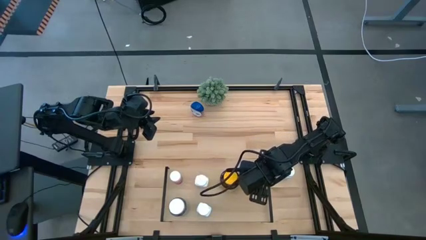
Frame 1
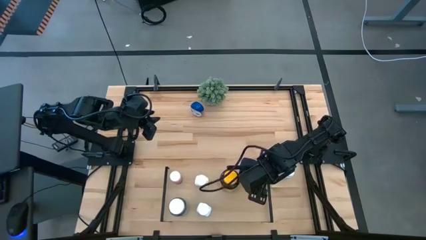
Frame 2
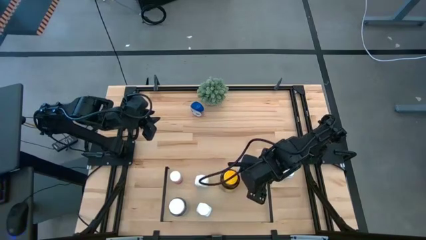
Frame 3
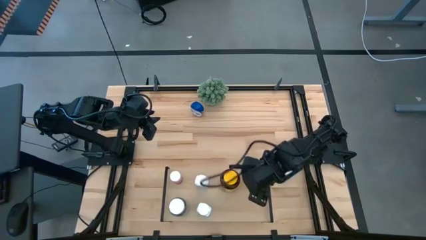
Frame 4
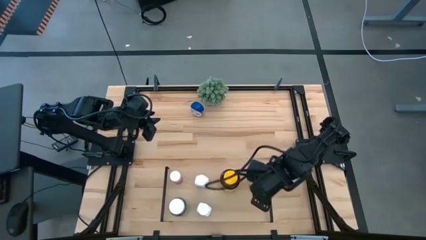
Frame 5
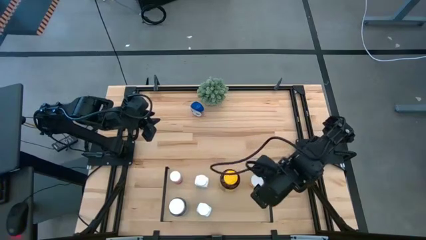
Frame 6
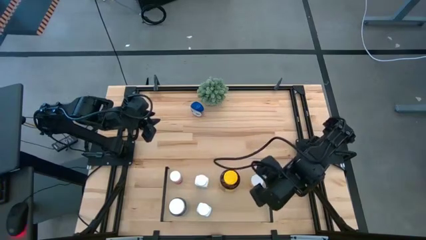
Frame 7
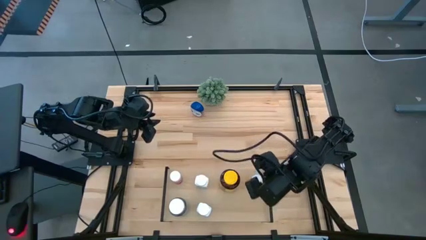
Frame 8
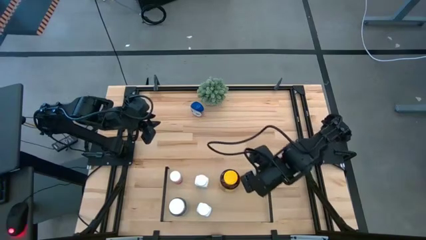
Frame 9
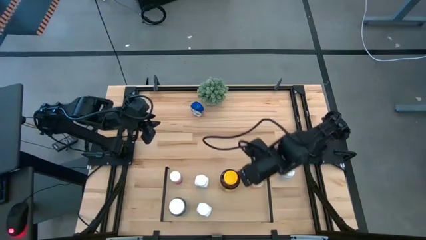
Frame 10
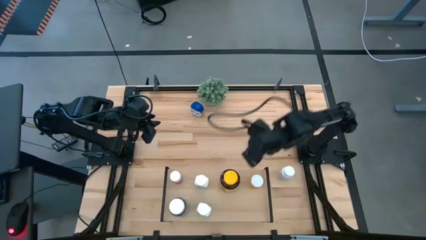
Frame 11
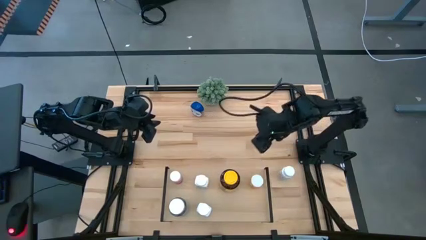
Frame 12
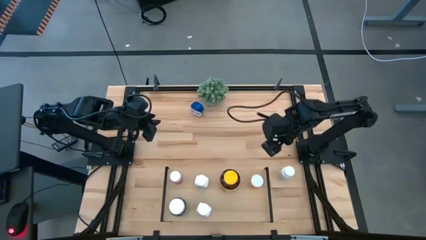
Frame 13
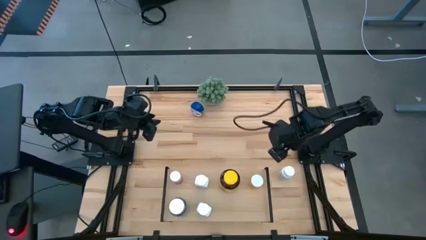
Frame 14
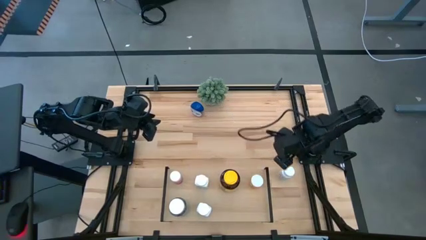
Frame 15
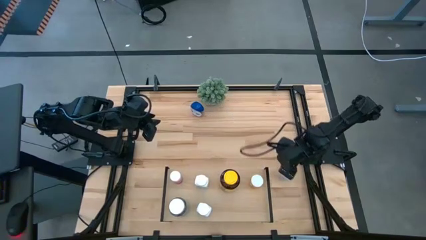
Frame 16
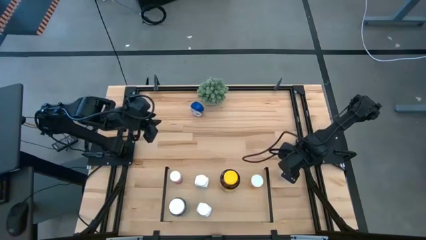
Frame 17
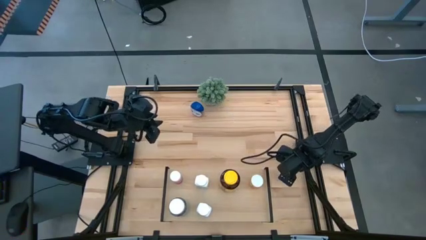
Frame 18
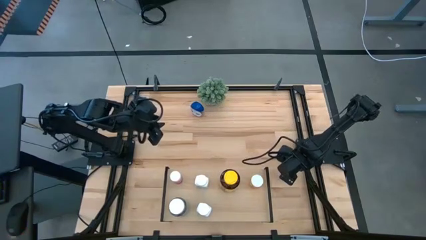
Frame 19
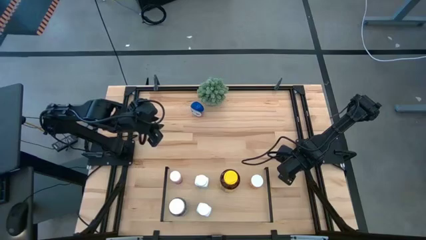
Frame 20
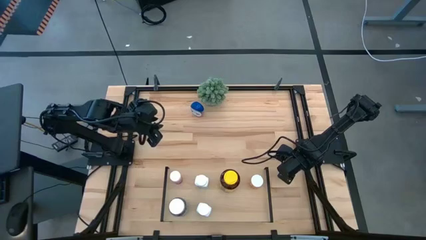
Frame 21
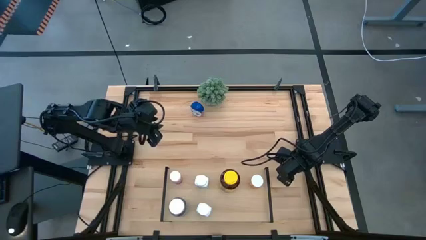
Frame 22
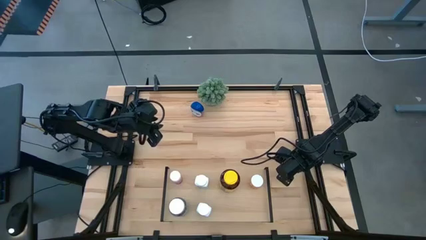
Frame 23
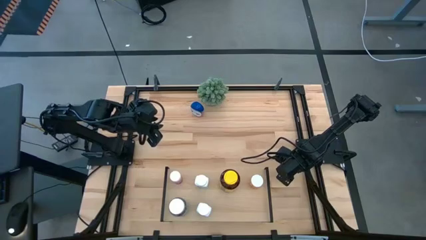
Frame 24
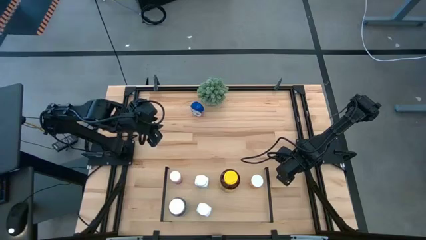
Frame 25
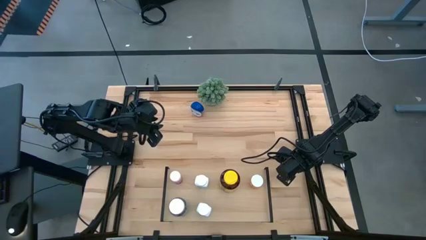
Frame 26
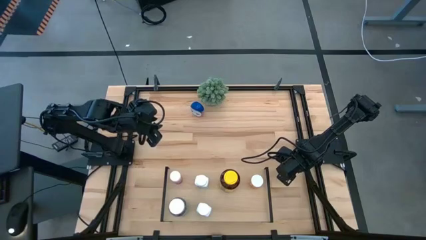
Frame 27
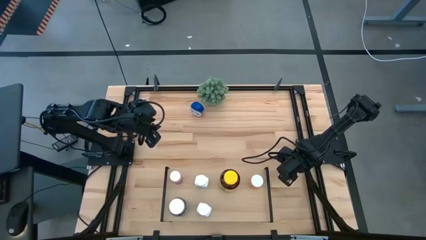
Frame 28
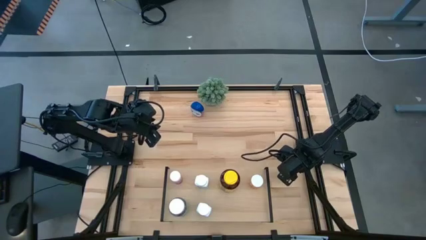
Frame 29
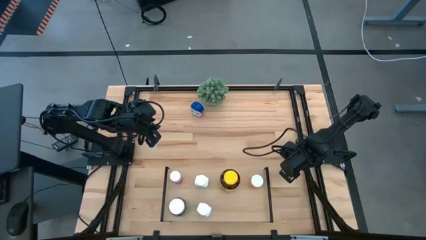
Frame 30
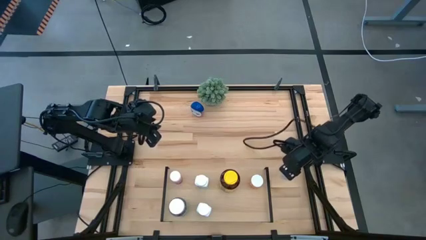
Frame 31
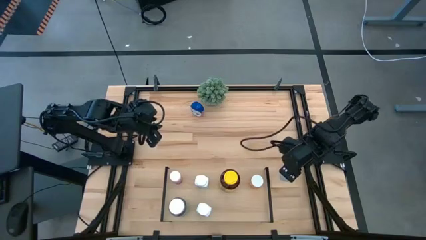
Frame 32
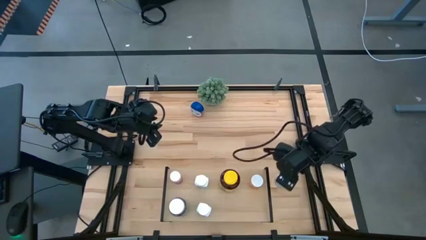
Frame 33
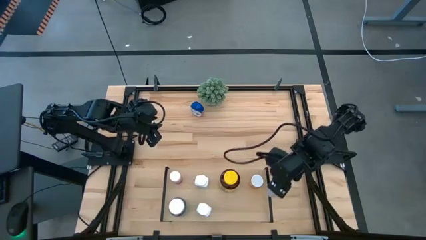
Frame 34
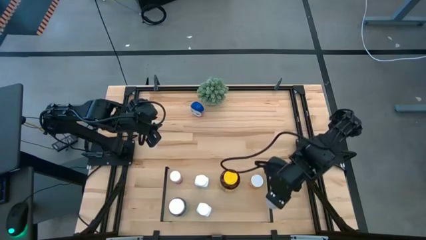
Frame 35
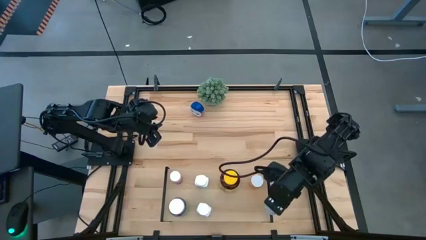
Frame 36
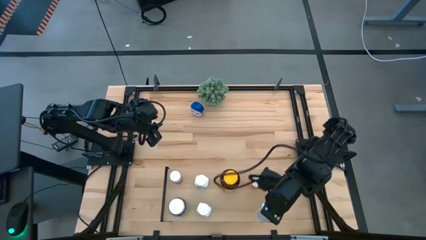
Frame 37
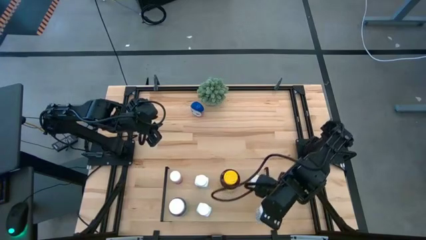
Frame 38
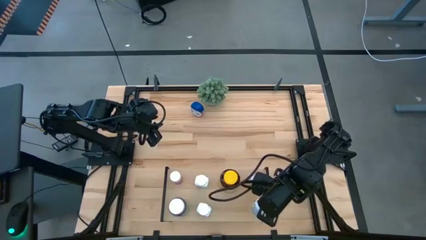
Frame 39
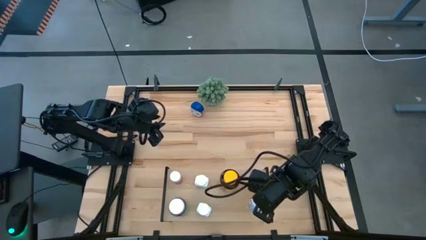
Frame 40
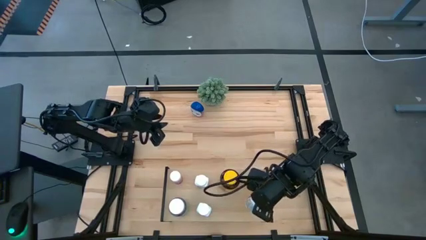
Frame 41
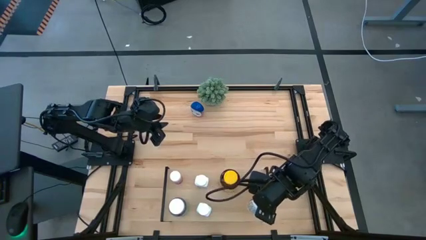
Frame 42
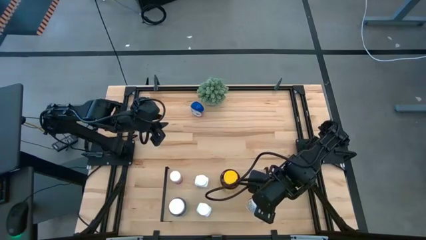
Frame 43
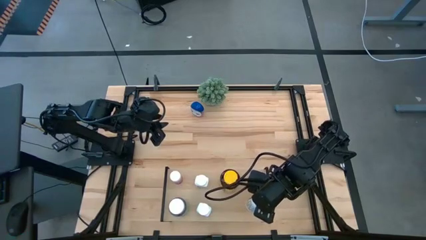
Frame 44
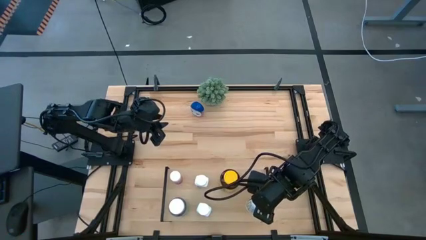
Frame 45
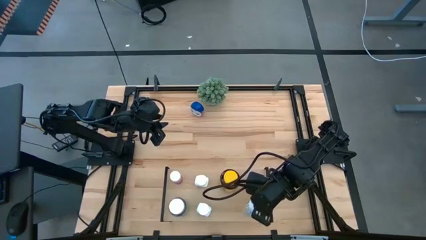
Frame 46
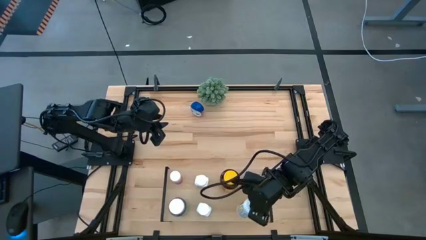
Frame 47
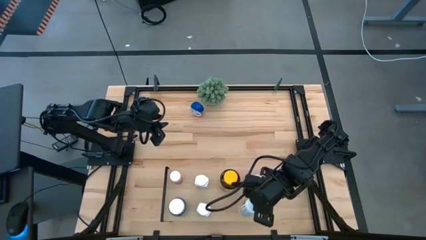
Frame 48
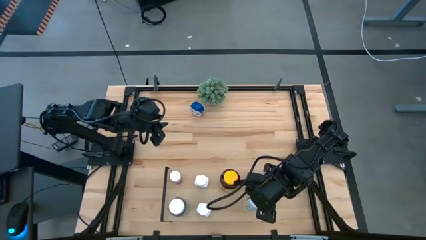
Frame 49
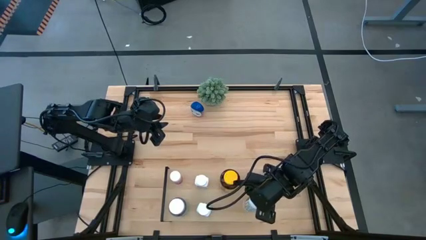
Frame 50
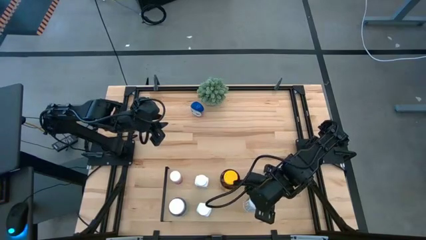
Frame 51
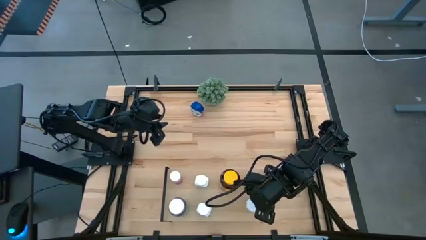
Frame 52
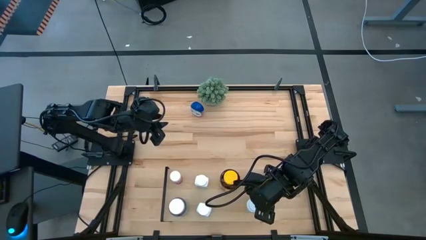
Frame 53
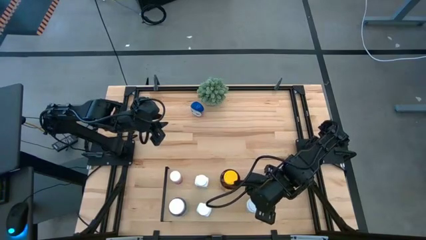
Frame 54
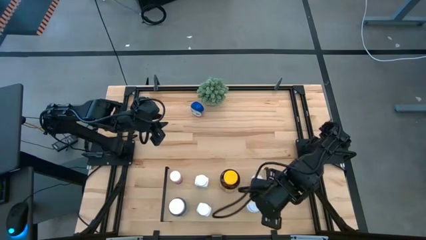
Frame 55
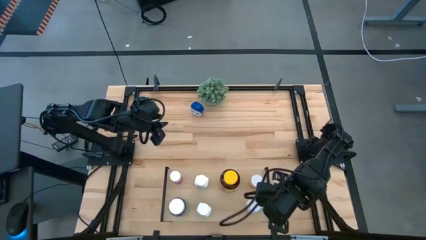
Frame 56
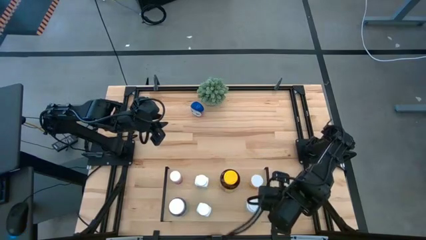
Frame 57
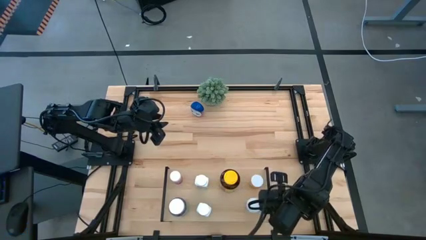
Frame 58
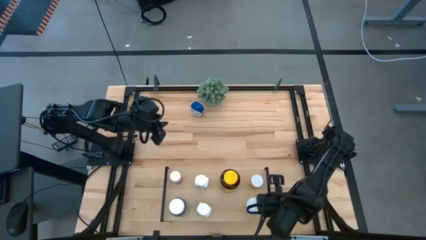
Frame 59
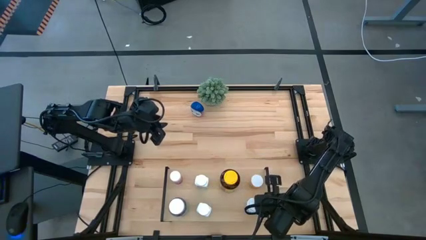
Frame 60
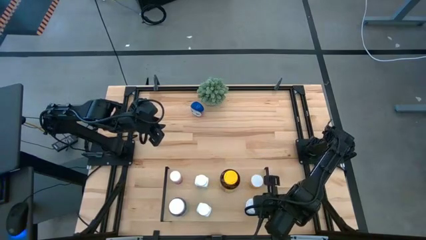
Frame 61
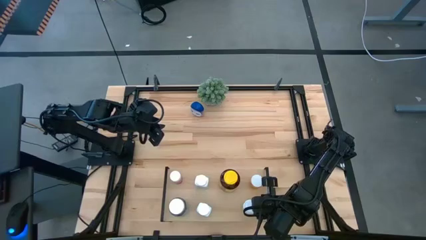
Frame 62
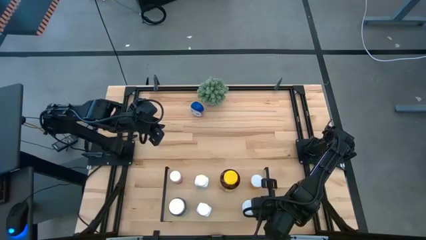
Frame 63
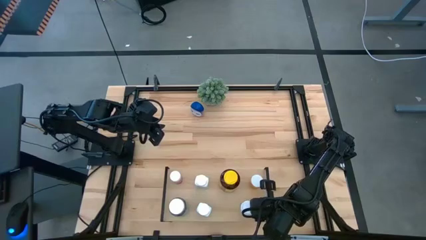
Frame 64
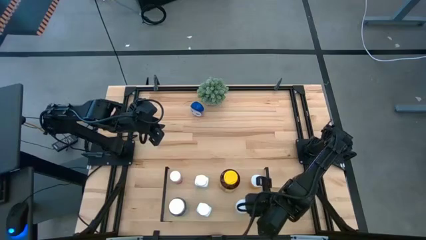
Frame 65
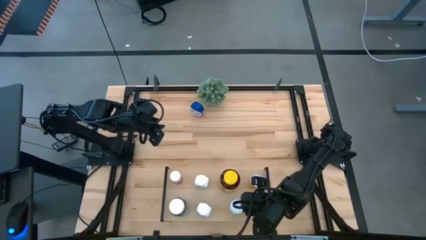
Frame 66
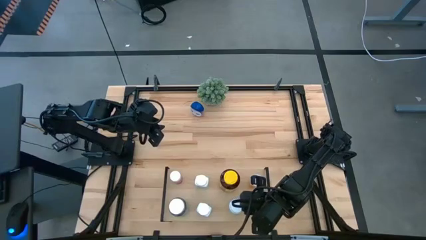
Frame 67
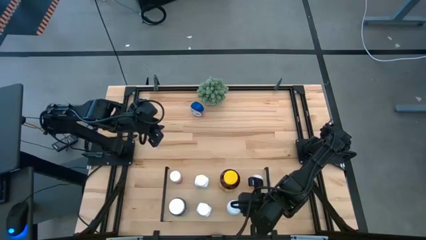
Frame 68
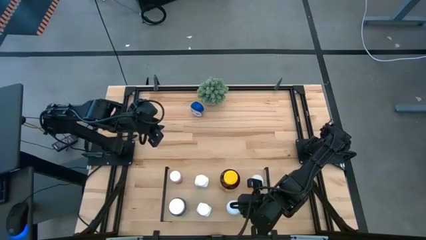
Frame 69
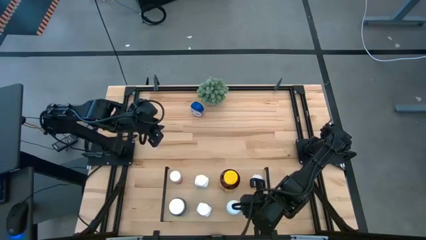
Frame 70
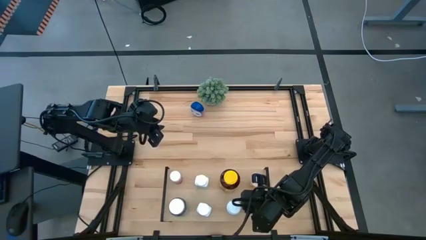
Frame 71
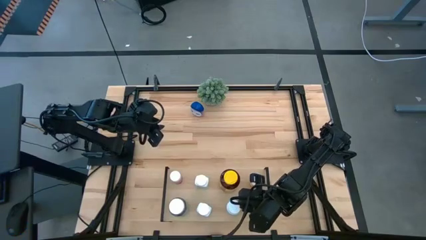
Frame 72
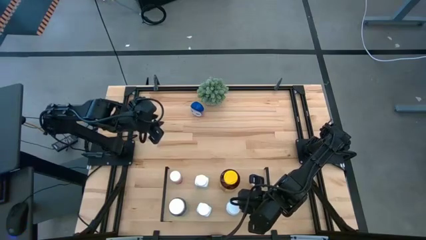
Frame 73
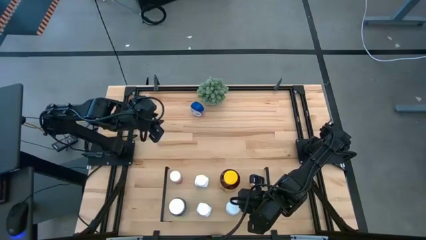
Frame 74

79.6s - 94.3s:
Task: Pick and place medicine bottles onto shelf by color
Put the white pill bottle on the shelf
